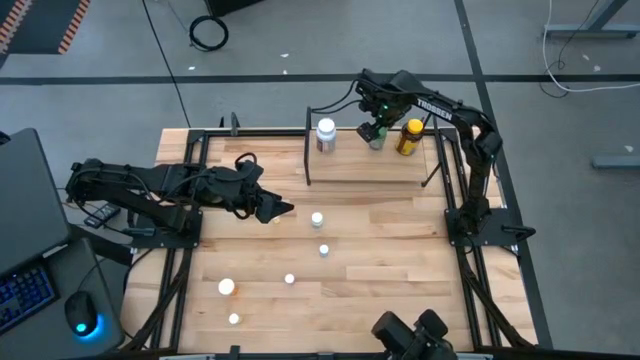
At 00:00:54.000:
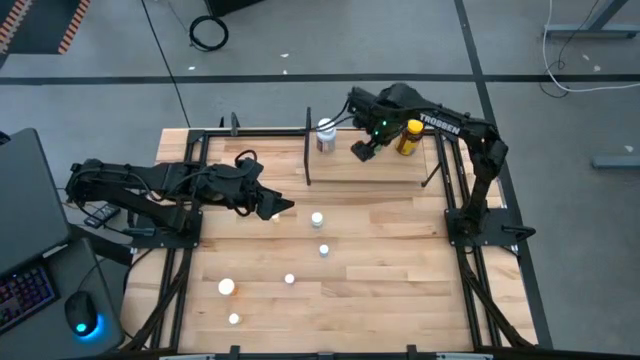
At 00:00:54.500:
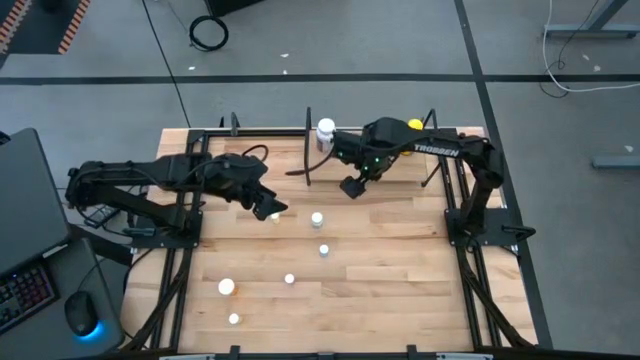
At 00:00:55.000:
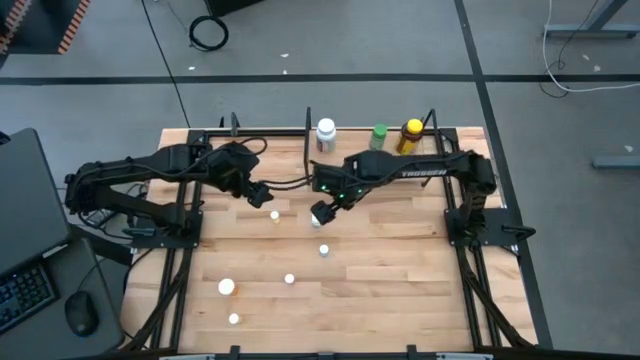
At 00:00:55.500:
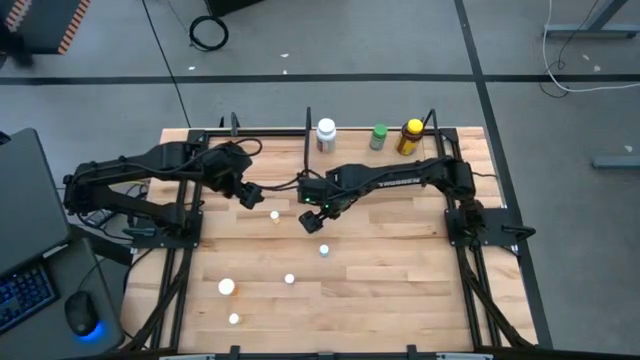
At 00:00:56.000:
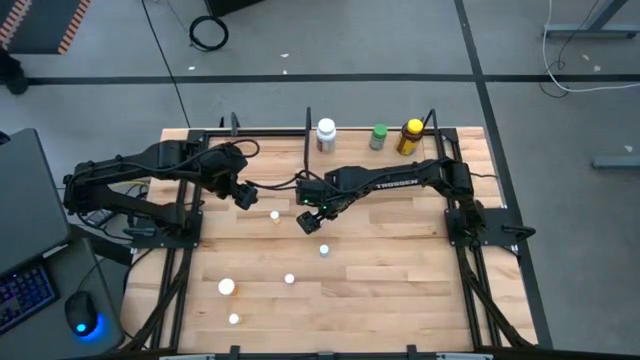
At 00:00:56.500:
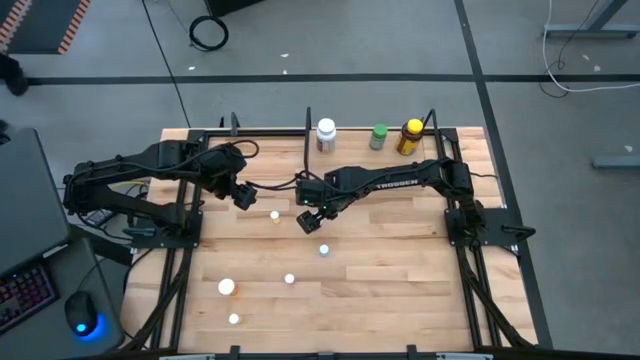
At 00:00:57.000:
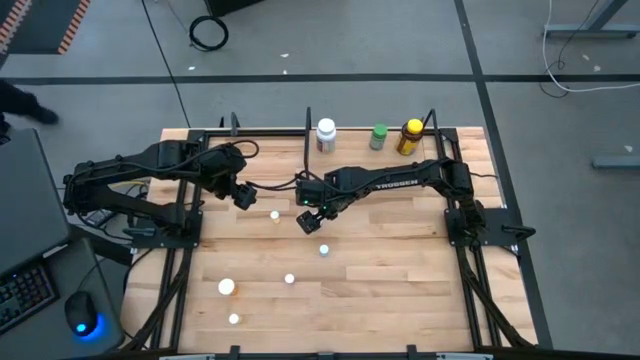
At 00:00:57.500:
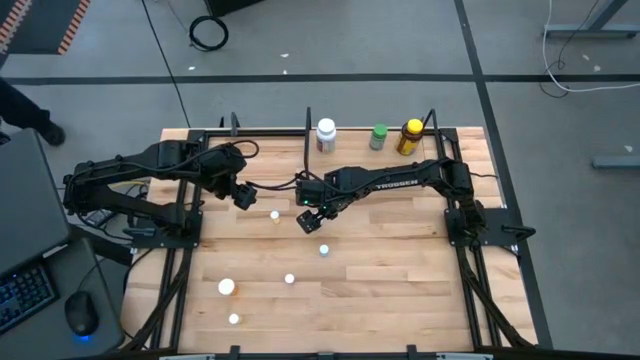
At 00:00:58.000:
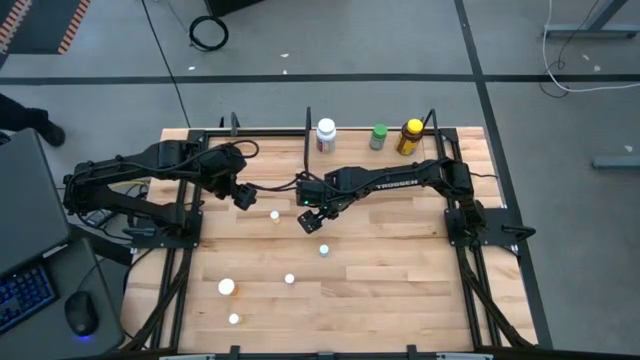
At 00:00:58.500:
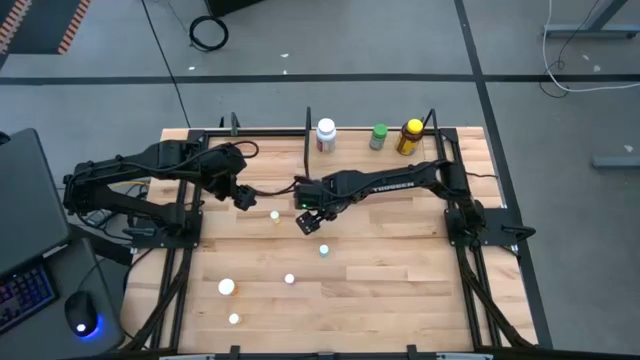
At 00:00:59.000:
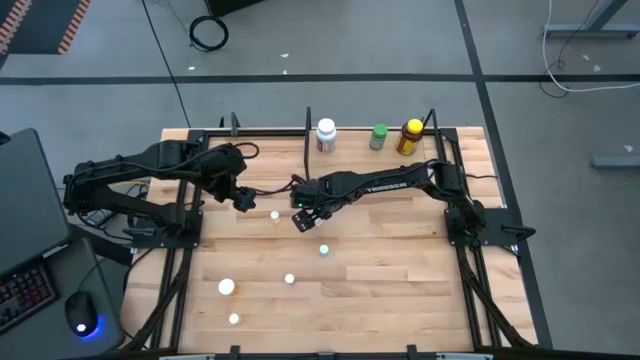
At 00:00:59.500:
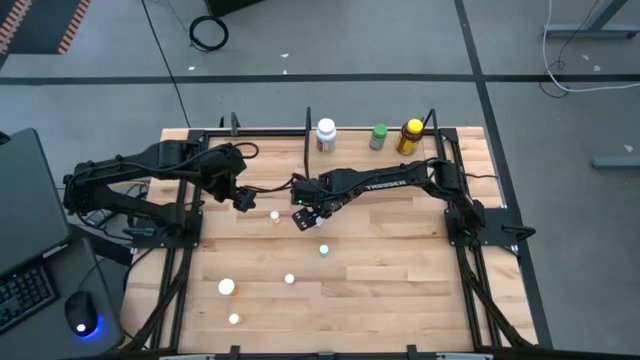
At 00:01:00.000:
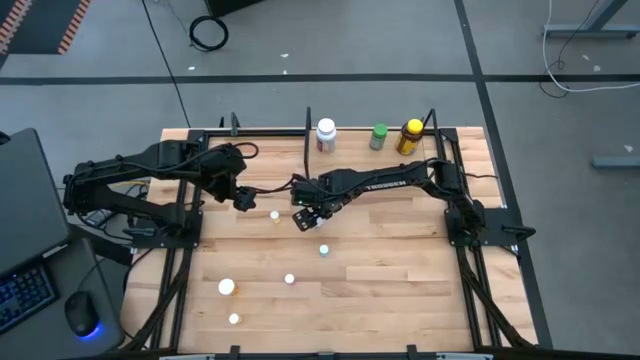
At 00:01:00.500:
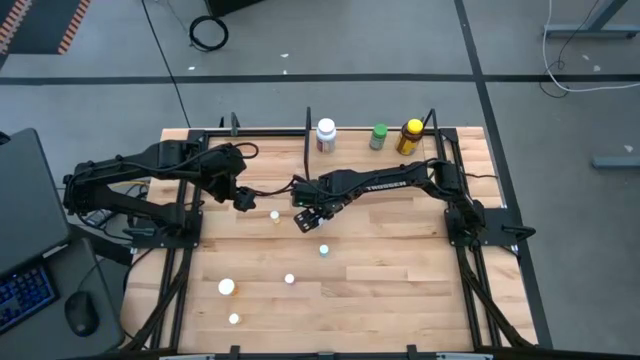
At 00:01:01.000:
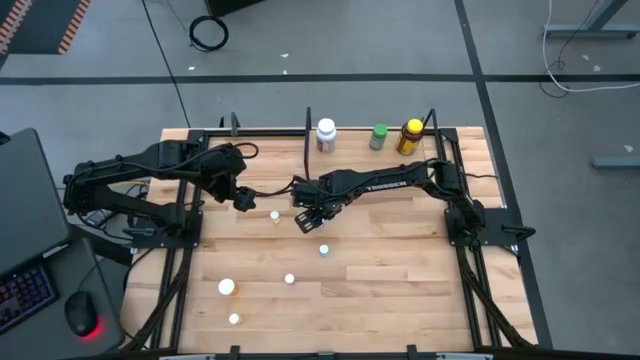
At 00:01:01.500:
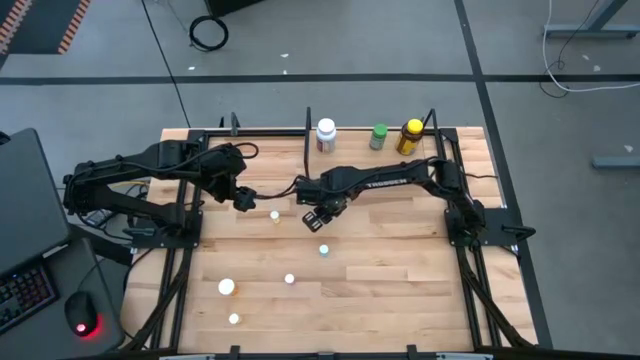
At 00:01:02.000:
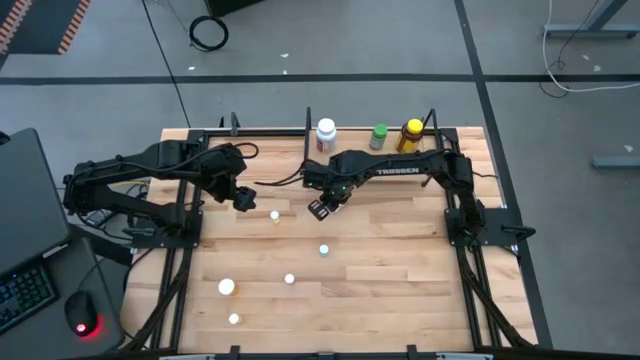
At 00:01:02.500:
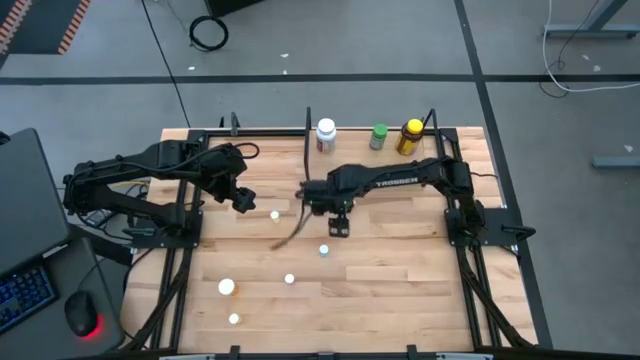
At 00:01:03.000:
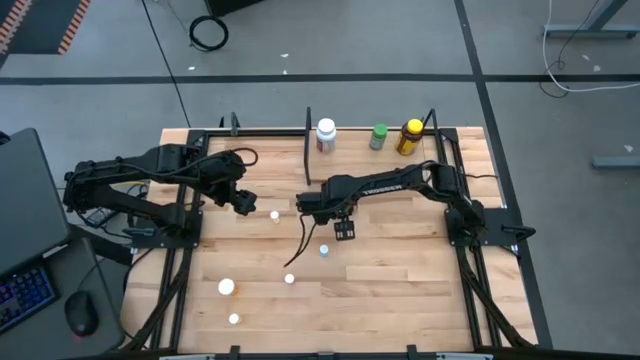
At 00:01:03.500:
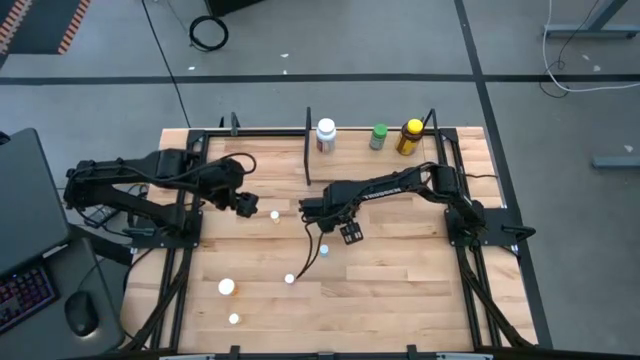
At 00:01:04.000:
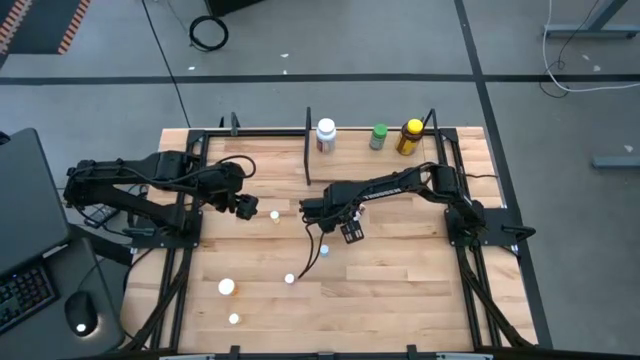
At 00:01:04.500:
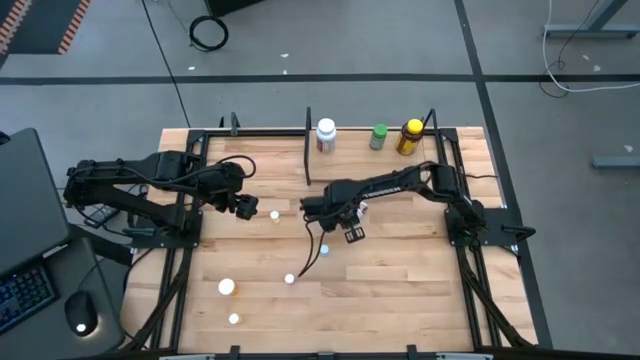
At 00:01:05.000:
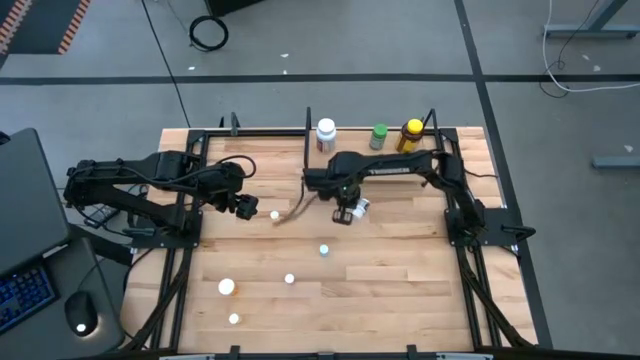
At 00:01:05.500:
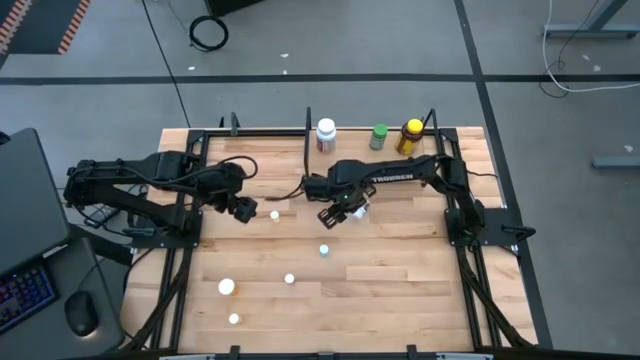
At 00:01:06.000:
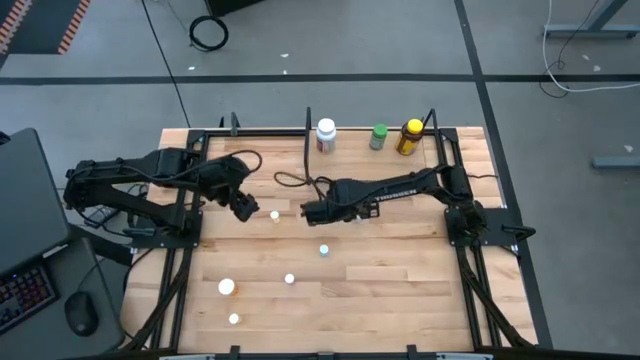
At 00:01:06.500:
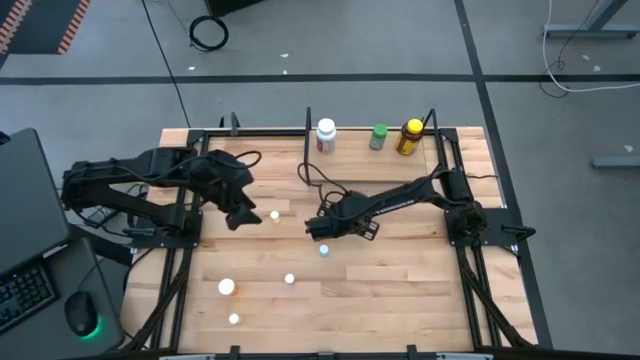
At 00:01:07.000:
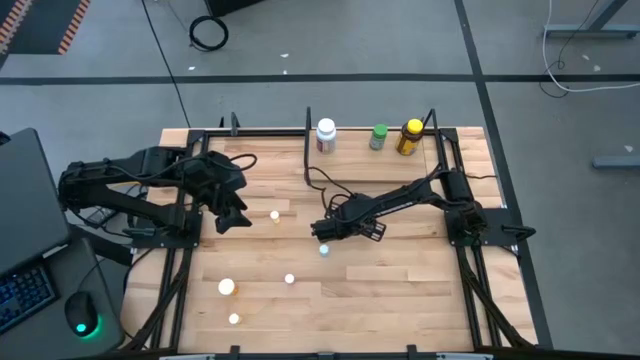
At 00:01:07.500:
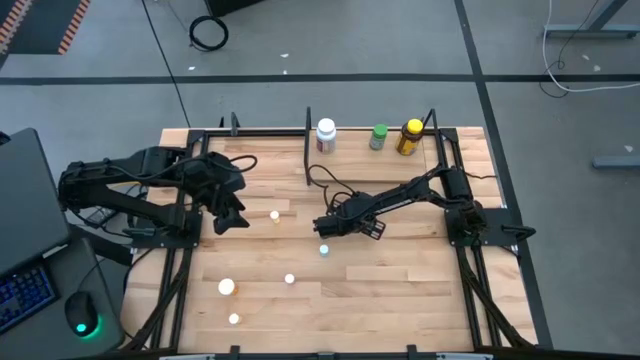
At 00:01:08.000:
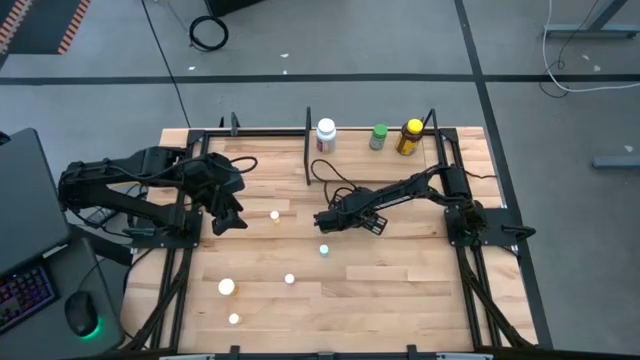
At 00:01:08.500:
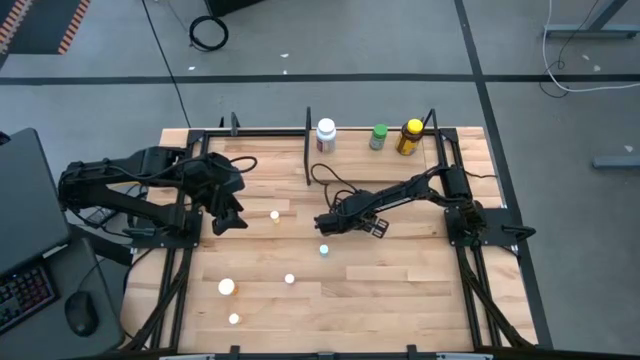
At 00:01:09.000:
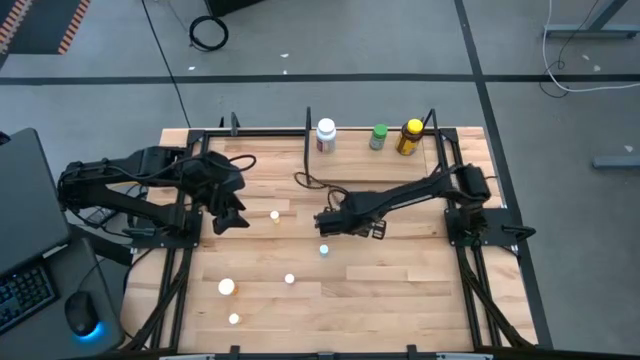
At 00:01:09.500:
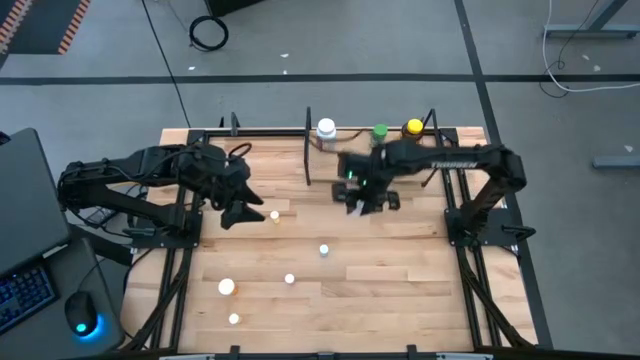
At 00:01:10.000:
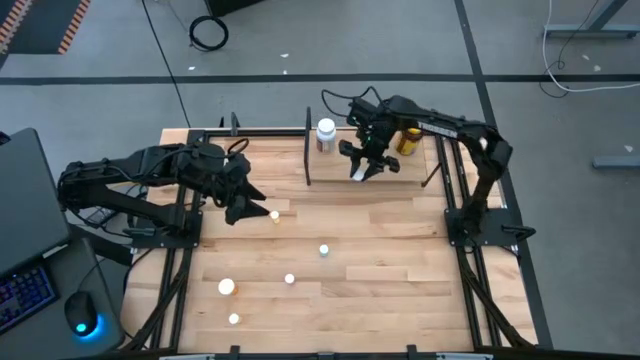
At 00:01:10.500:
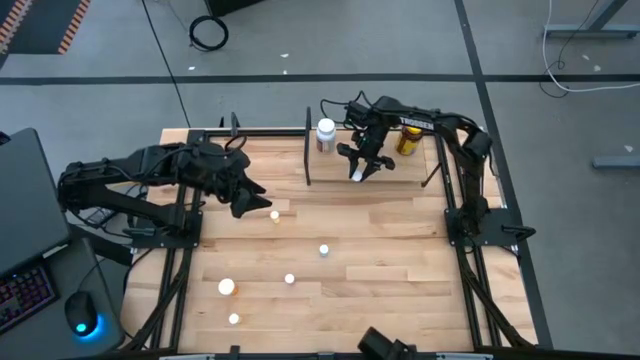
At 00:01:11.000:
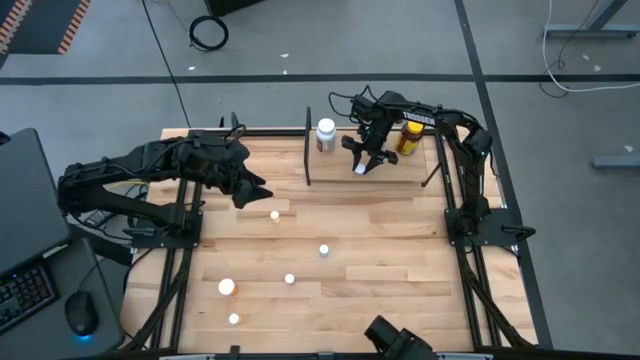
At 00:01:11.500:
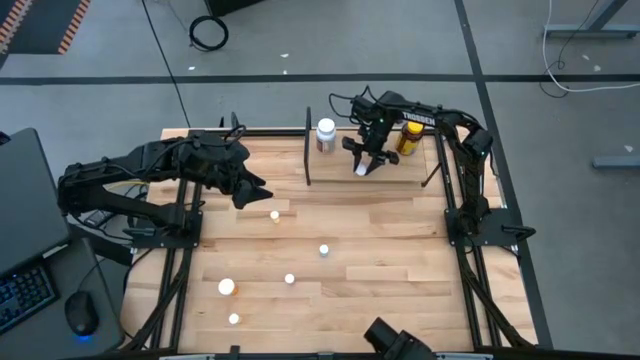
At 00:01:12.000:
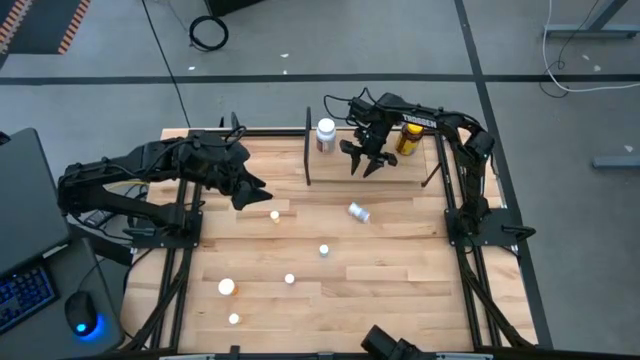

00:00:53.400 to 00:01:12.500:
Task: Pick and place medicine bottles onto shelf by color
Put the small white bottle pill bottle on the shelf

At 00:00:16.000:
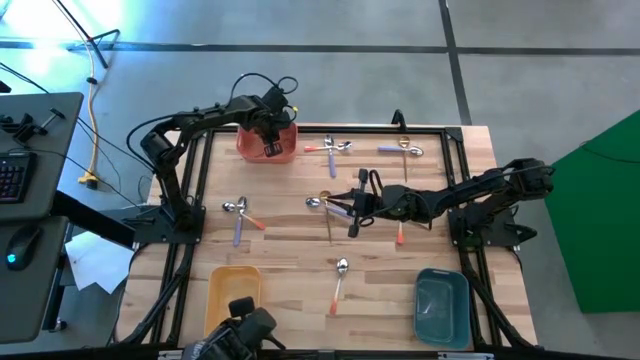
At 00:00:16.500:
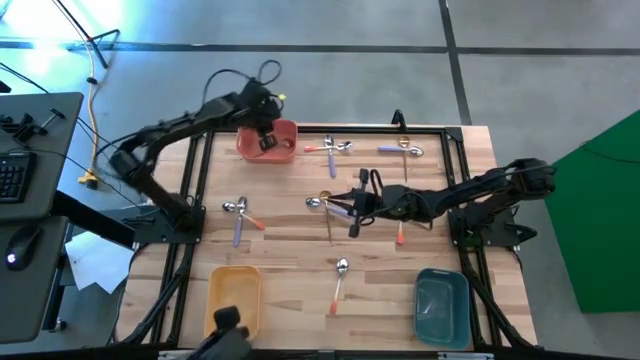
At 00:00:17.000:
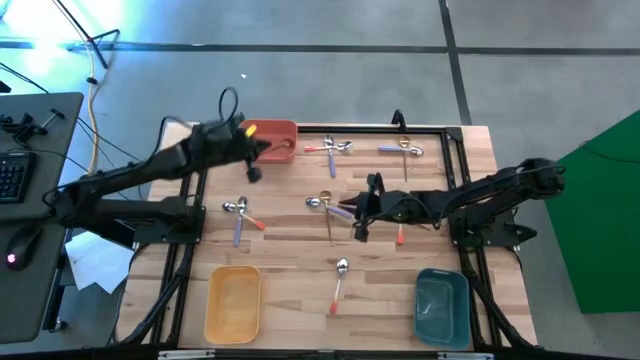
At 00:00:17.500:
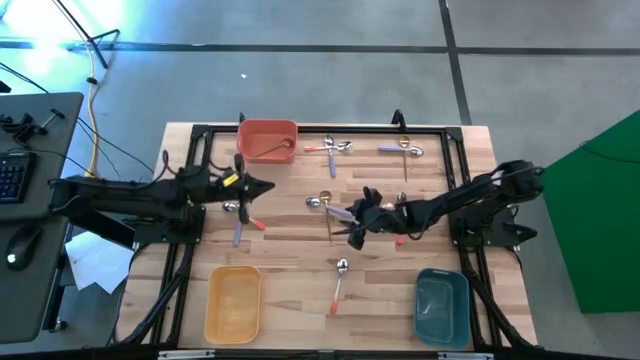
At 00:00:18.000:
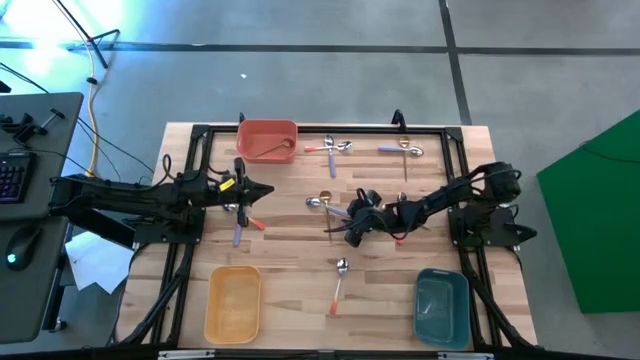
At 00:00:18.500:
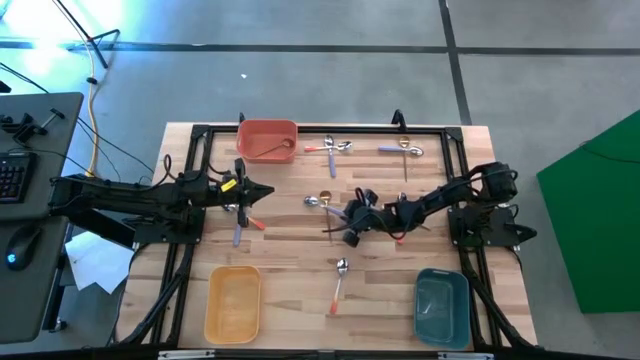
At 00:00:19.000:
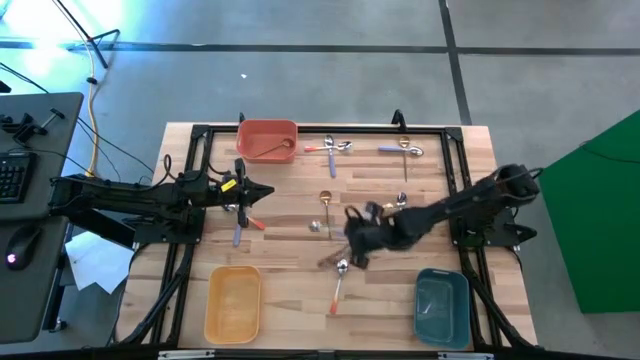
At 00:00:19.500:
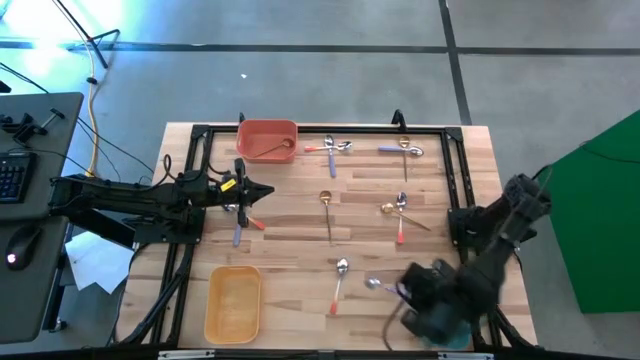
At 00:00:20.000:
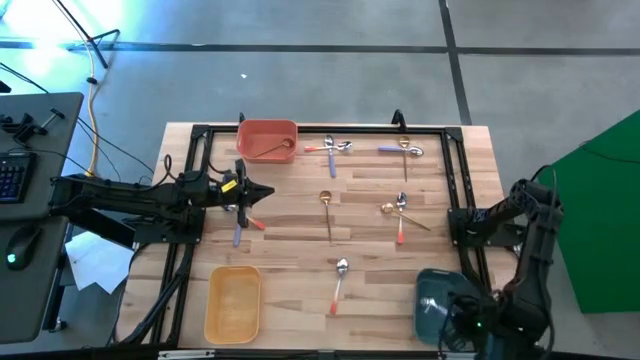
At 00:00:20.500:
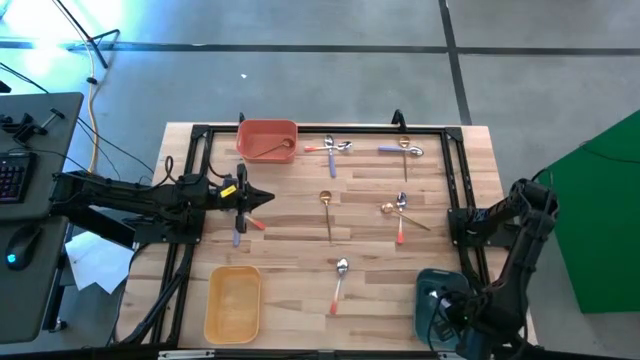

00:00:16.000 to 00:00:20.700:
Task: Sort silverware by color (type)
Put the bottom right purple spoon into the green bin
